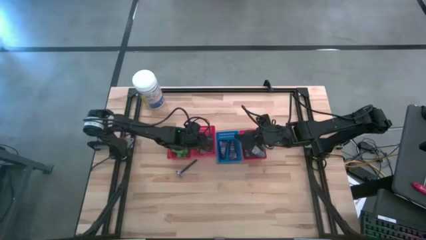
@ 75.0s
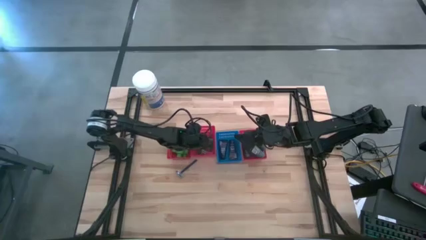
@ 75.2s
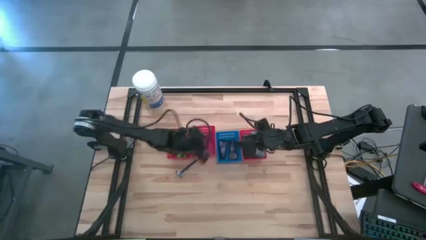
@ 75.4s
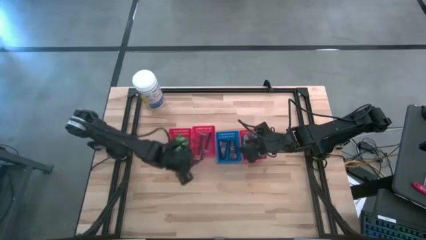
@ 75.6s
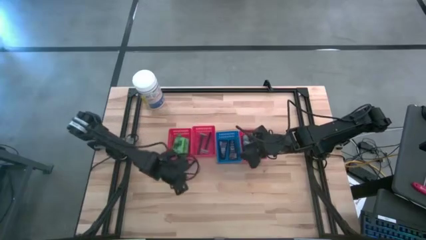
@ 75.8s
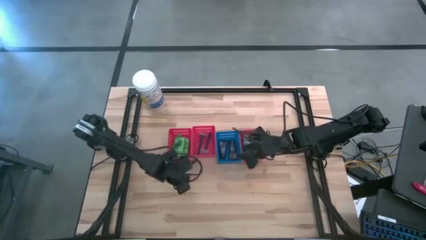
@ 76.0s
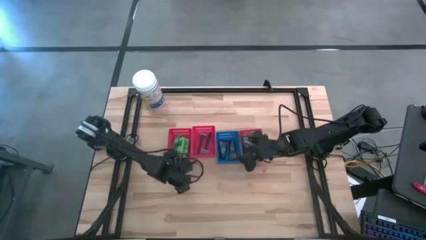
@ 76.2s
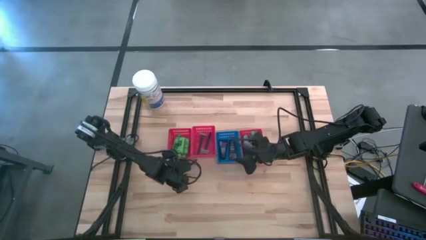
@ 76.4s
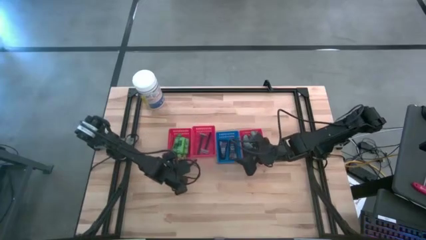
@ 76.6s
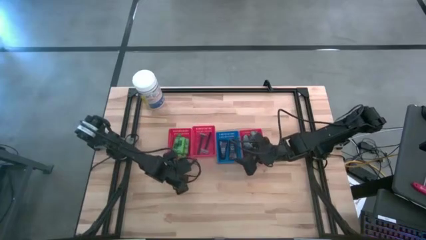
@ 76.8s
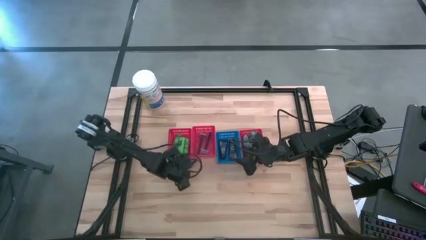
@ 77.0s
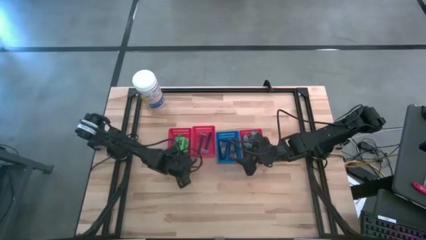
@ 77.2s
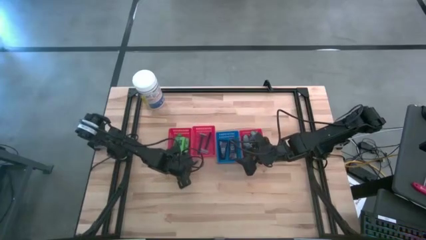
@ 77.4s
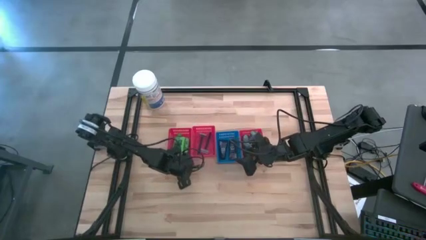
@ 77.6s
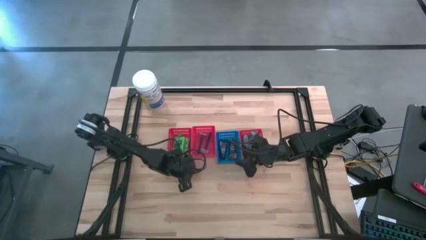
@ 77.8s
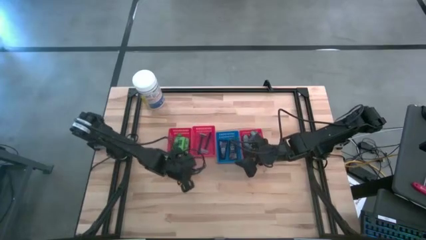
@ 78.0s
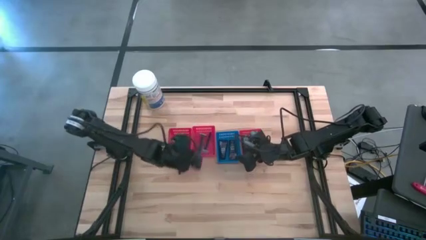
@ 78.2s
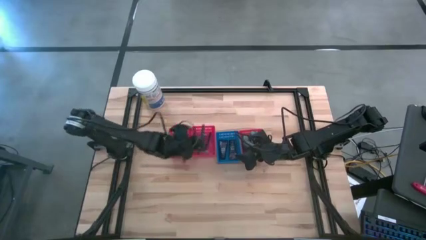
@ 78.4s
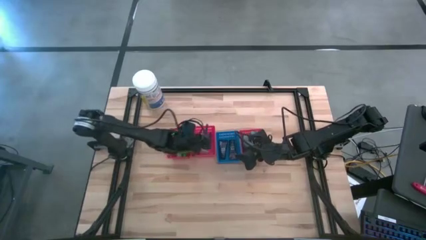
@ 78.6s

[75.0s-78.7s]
Task: Pick & Place Travel size toiletries
Put the blue razor into the middle red bin

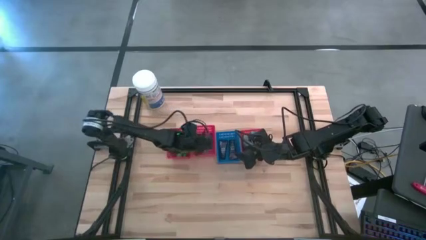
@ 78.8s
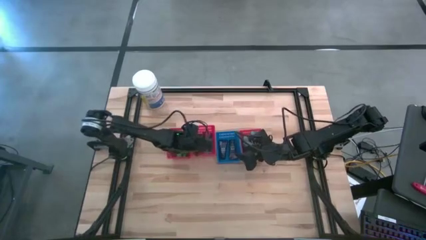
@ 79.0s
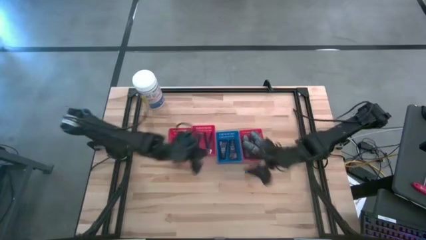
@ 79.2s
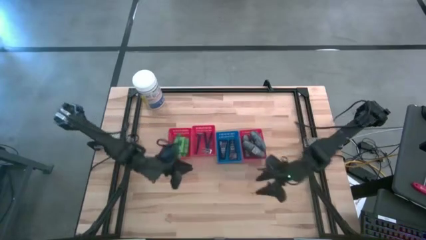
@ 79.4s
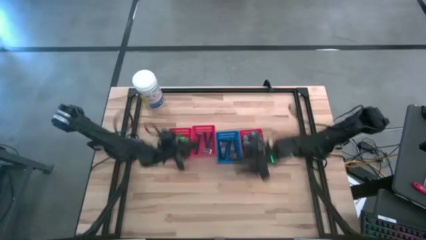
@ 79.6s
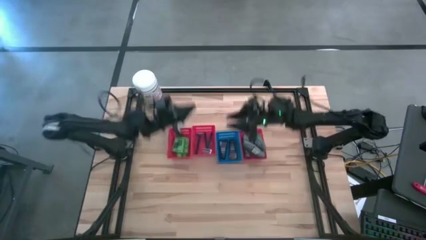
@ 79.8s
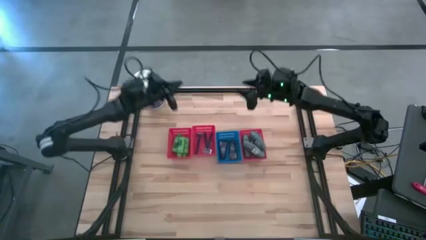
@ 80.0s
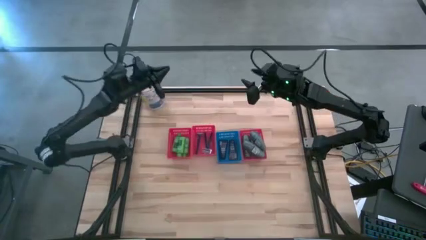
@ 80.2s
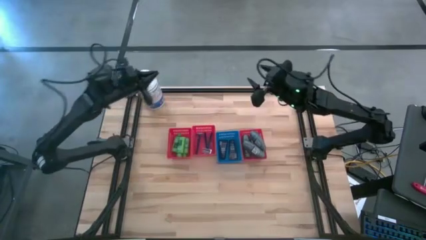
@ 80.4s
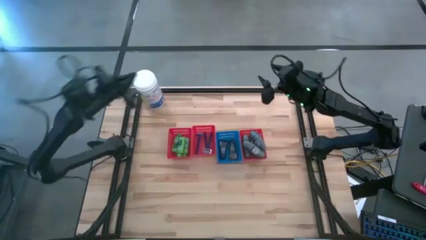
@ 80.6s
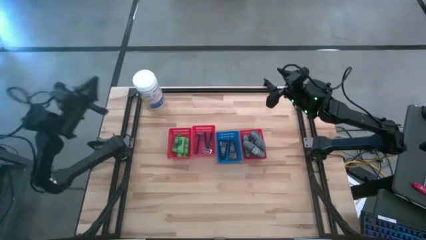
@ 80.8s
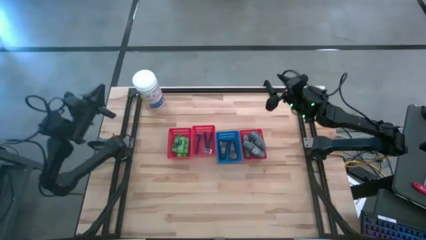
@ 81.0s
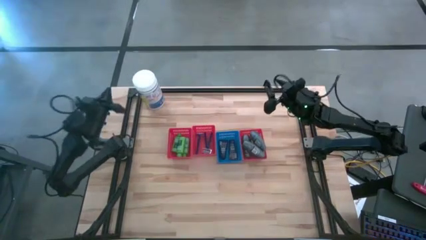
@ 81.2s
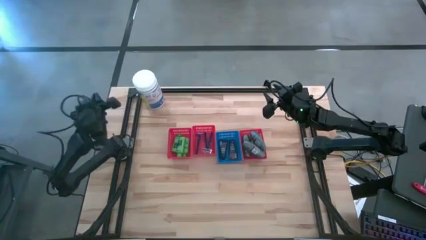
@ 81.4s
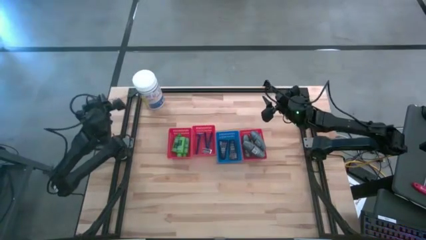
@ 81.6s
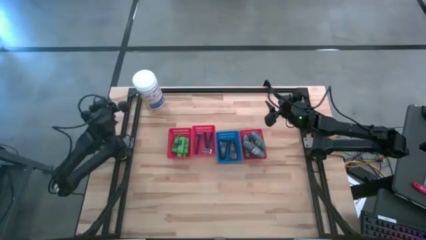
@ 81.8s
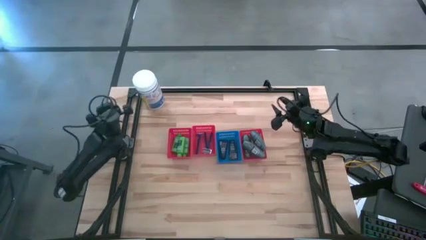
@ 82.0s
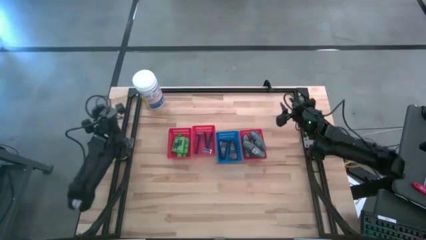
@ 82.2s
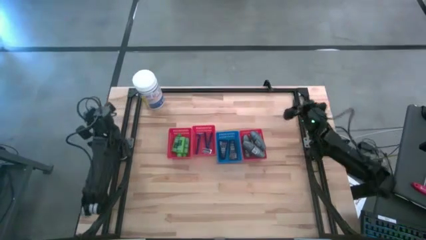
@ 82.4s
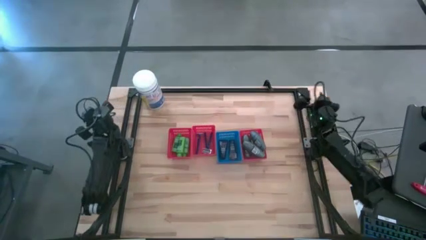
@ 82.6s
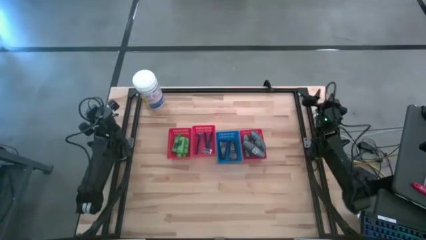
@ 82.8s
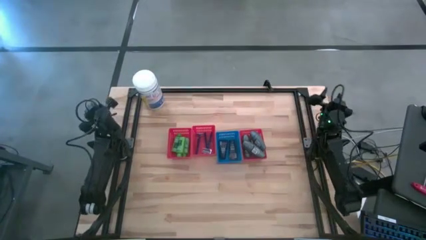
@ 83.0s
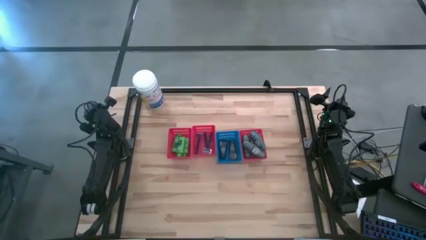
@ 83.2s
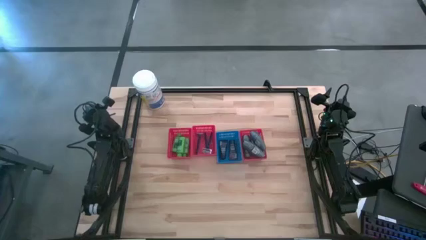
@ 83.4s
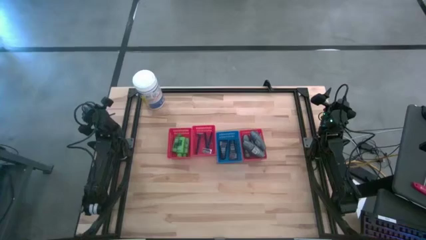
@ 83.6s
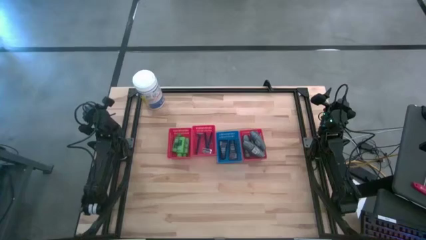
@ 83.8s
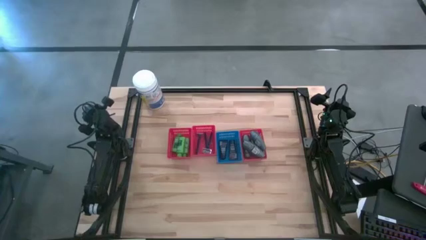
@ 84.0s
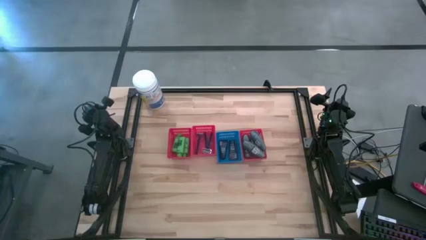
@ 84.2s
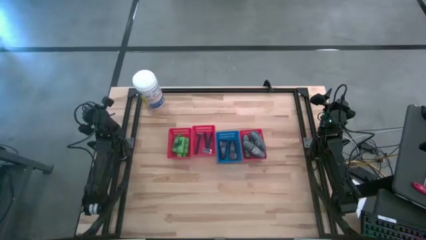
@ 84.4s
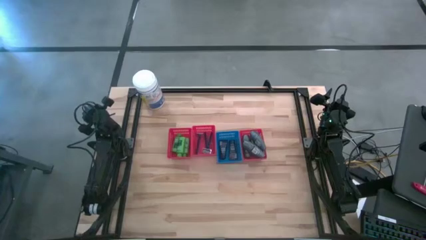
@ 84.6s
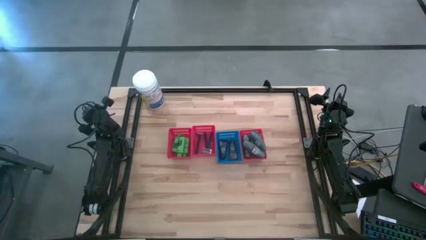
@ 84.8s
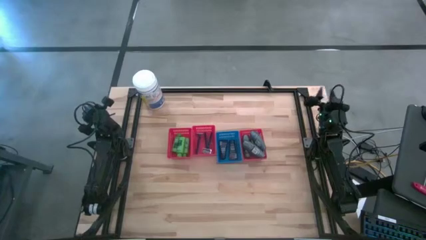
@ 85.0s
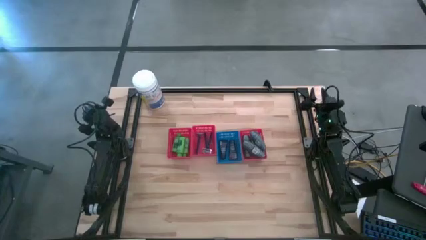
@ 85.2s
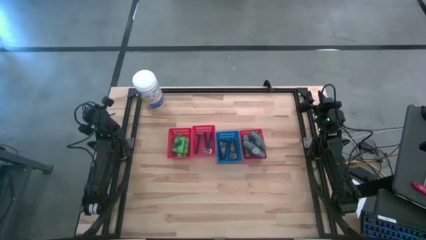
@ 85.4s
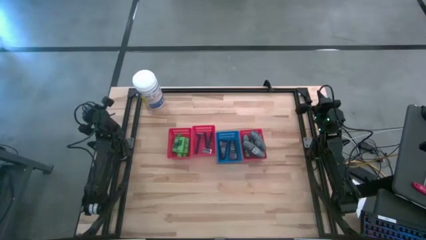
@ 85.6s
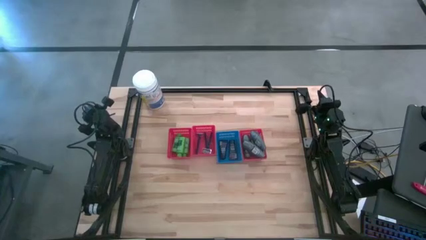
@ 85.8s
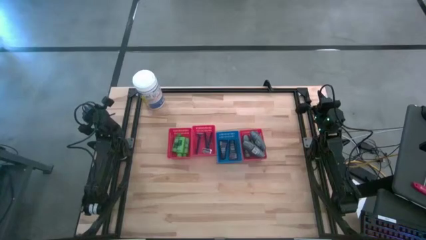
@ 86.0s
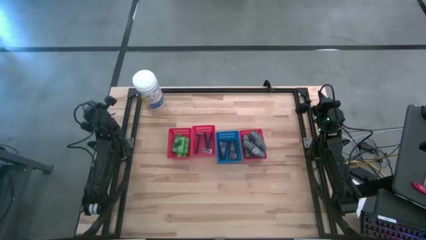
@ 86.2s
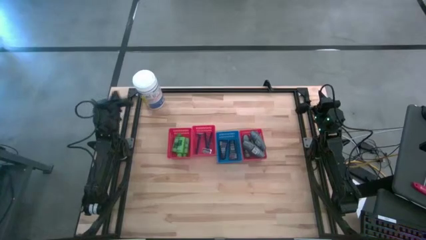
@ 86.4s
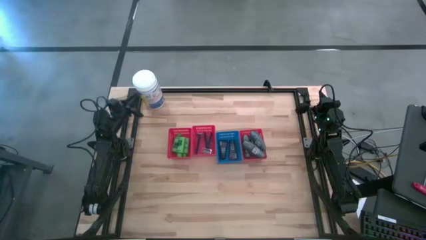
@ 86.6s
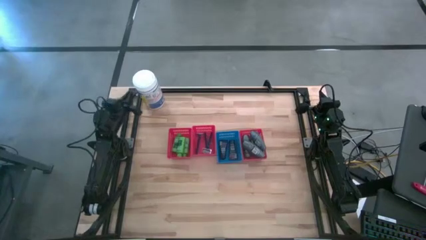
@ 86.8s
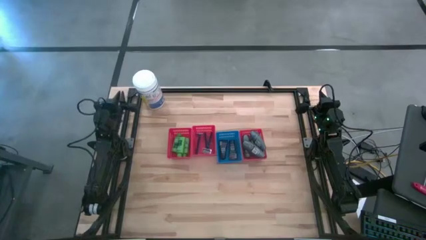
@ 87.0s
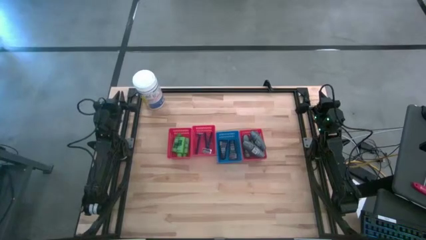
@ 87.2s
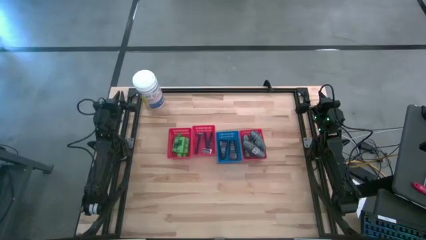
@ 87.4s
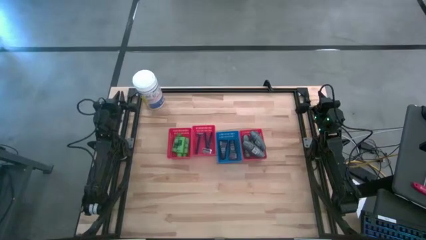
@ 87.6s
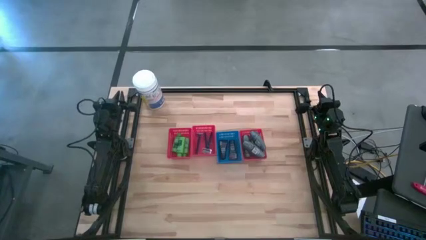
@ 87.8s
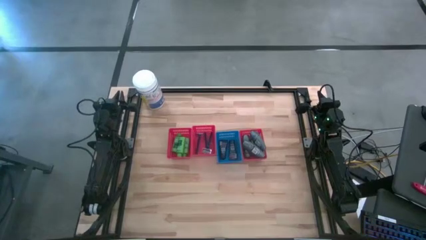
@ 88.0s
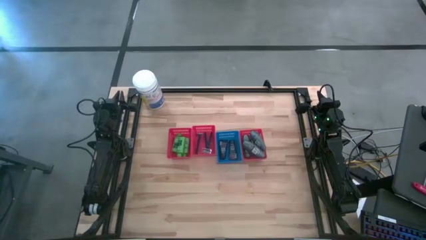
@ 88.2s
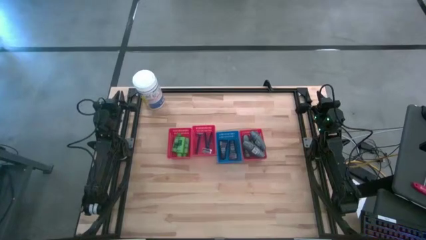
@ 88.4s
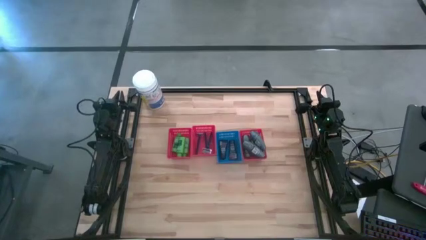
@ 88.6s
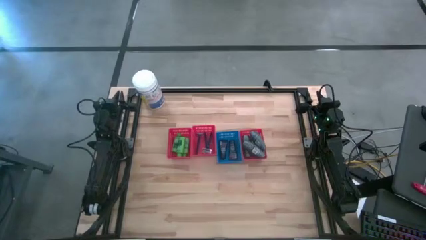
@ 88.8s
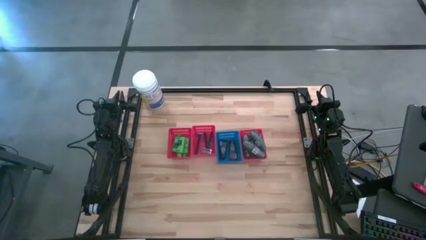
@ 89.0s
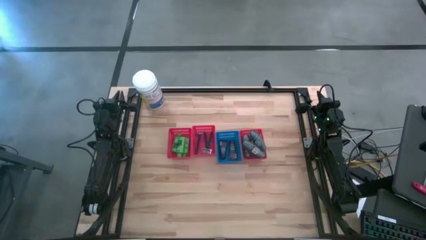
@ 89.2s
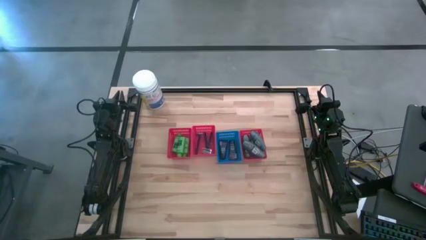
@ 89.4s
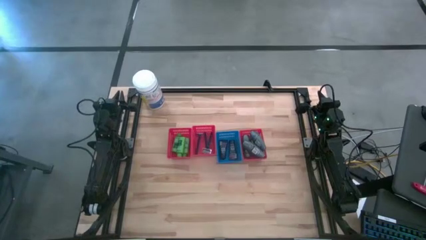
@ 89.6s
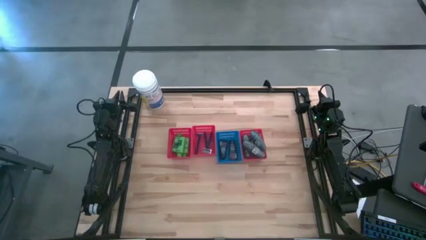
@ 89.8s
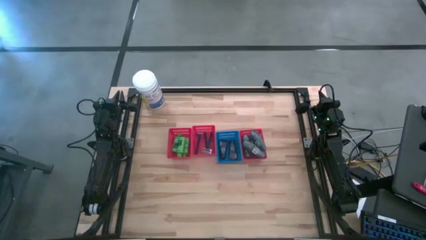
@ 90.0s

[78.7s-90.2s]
Return to Home Position

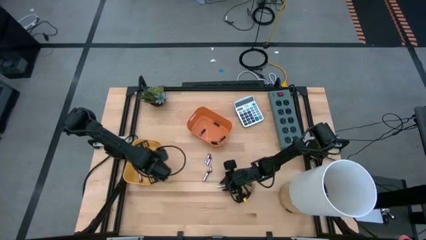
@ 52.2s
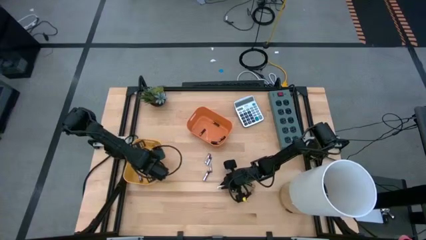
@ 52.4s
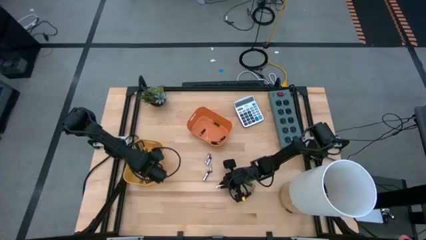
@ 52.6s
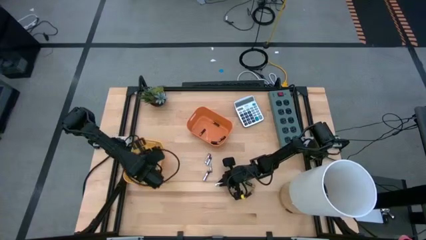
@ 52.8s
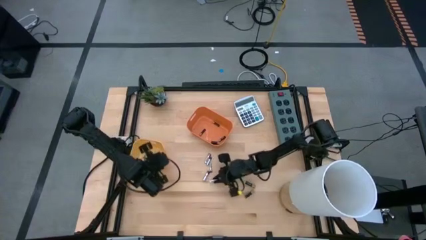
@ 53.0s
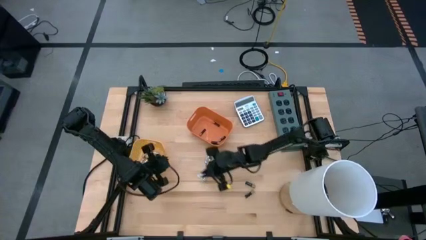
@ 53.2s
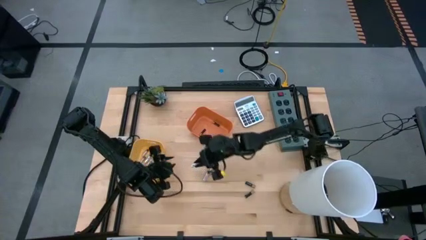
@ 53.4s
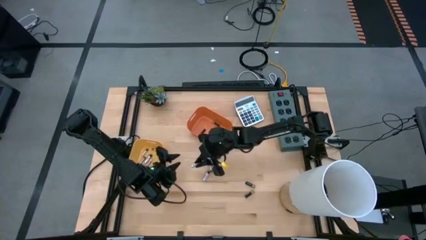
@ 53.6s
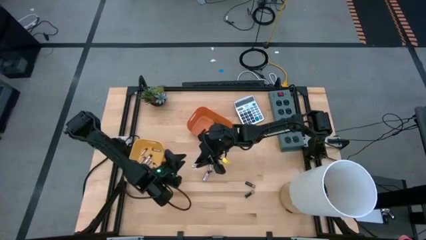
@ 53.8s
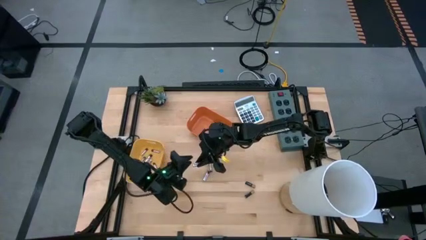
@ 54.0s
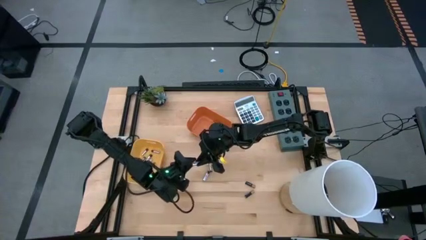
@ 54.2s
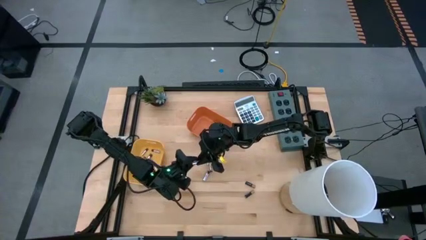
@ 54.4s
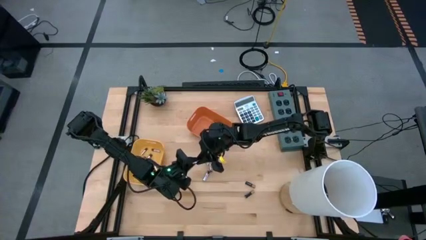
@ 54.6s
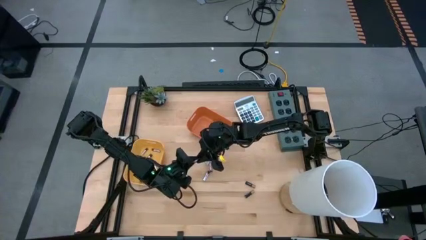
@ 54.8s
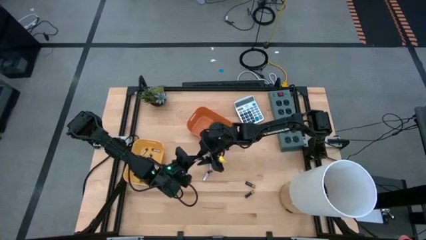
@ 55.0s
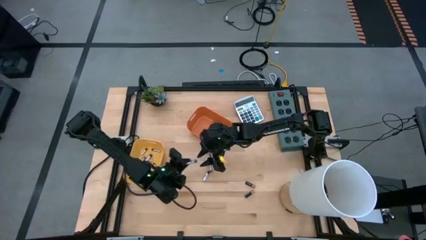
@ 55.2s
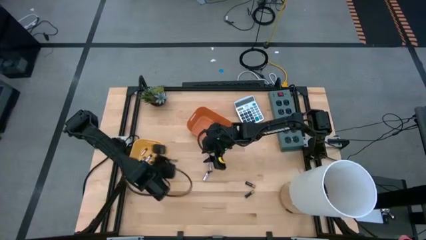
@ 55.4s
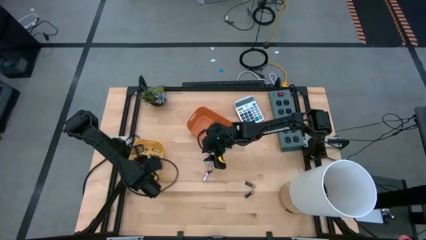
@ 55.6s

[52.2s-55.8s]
Task: Sort batteries
Put the silver battery into the yellow bin
